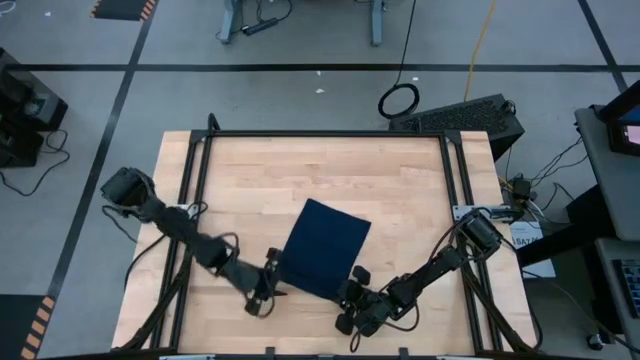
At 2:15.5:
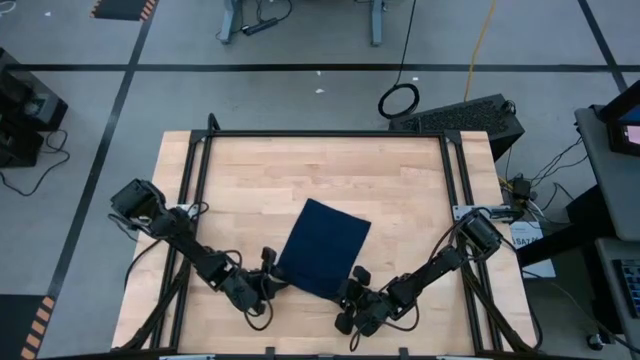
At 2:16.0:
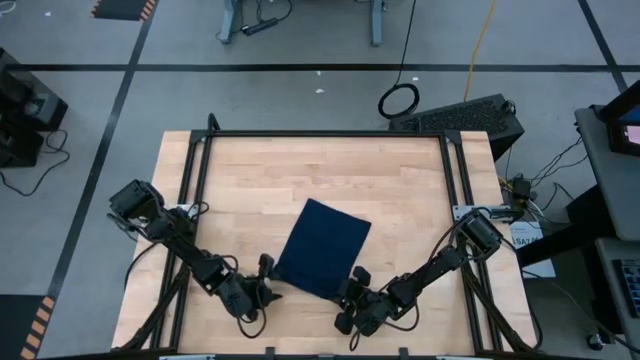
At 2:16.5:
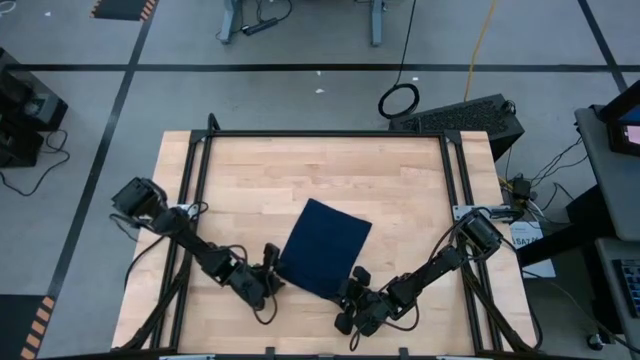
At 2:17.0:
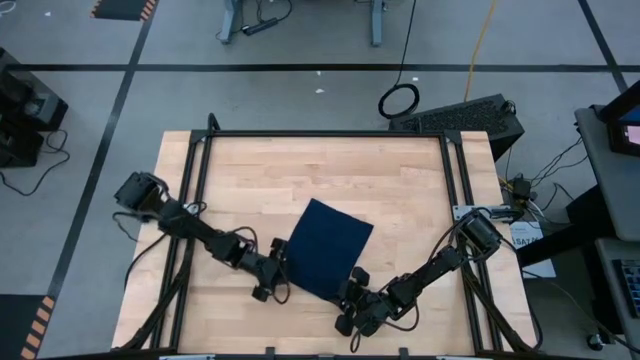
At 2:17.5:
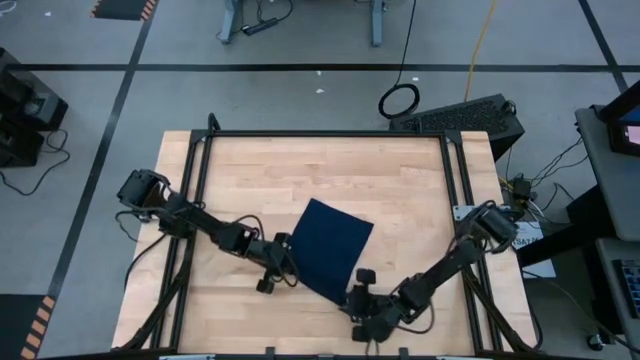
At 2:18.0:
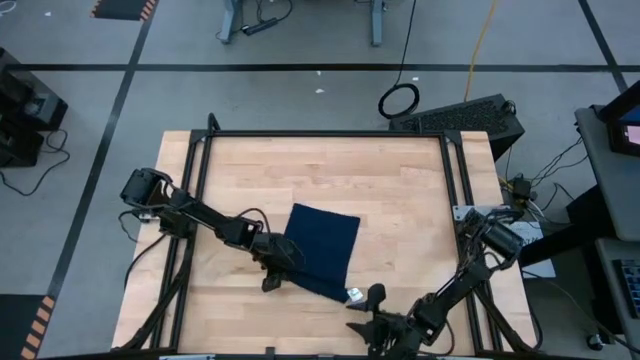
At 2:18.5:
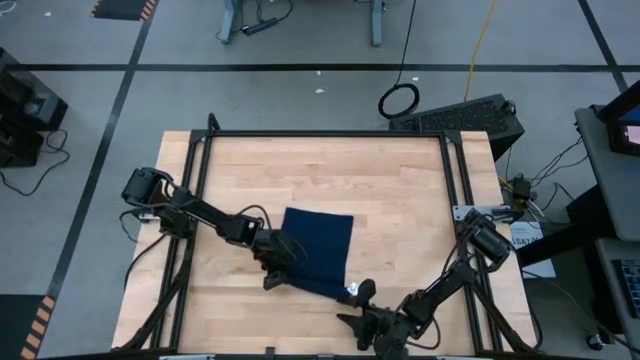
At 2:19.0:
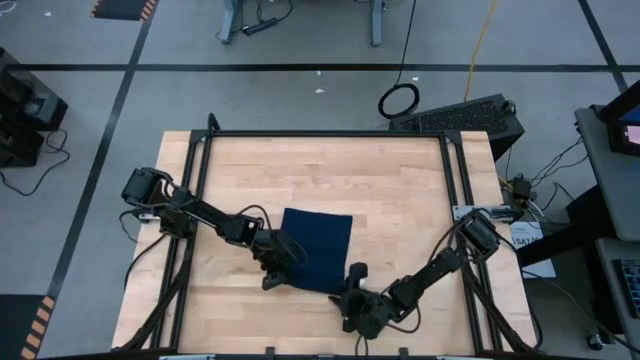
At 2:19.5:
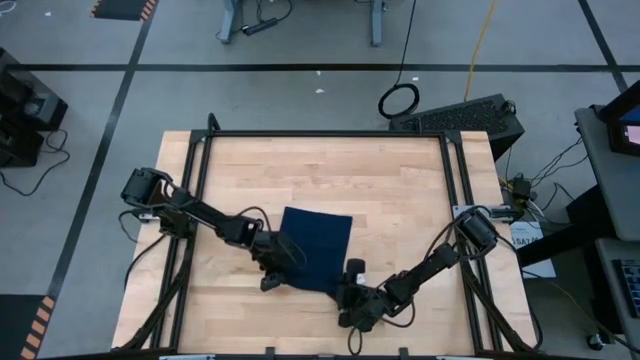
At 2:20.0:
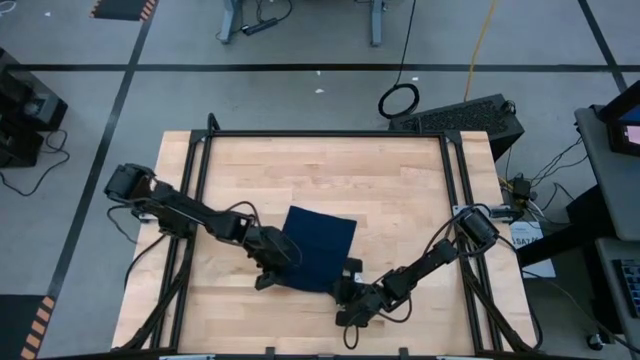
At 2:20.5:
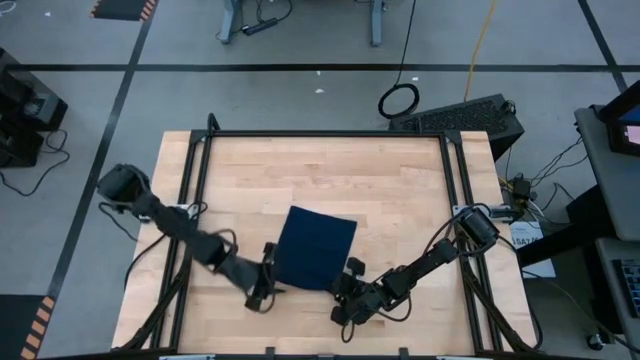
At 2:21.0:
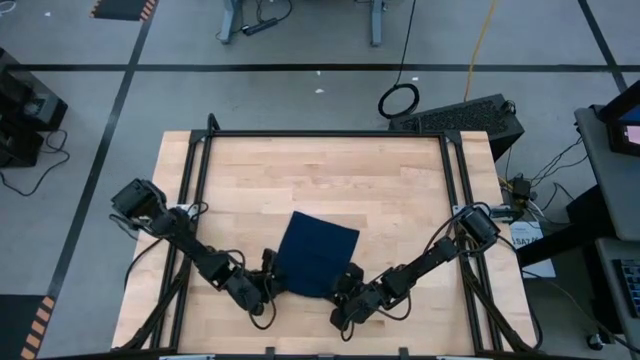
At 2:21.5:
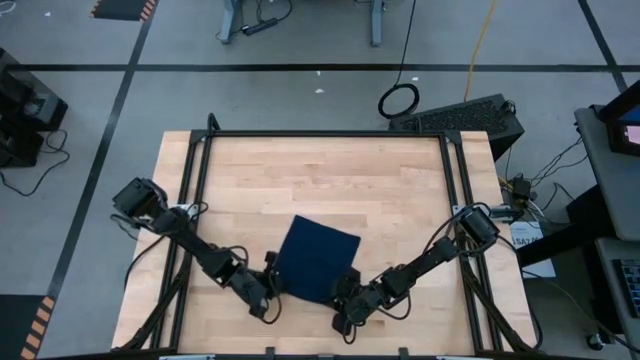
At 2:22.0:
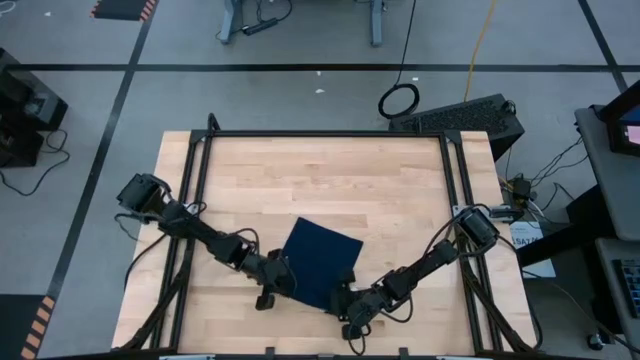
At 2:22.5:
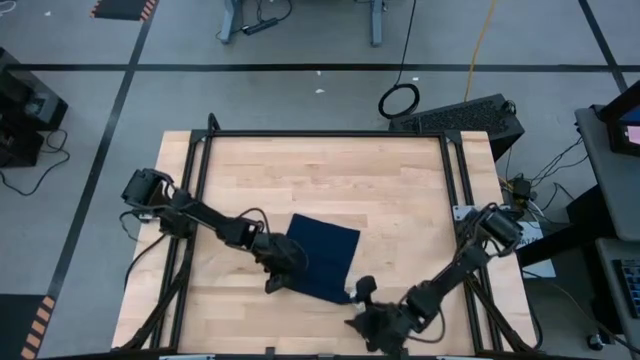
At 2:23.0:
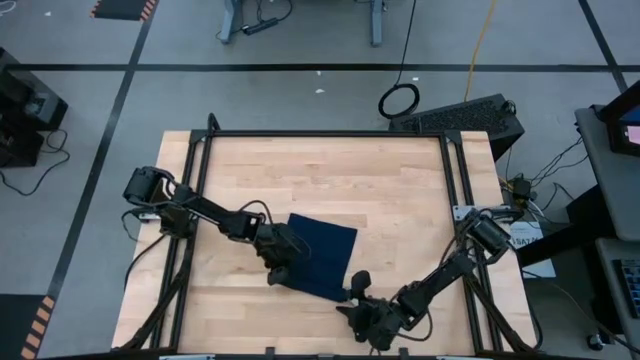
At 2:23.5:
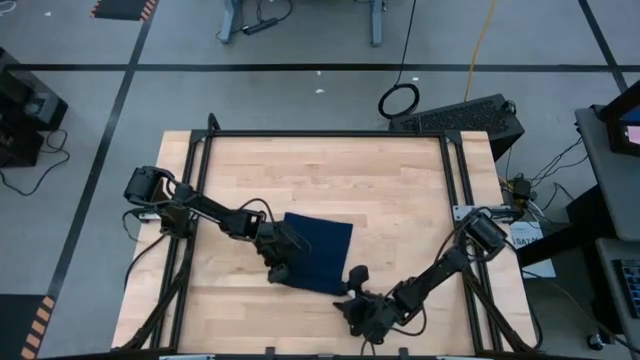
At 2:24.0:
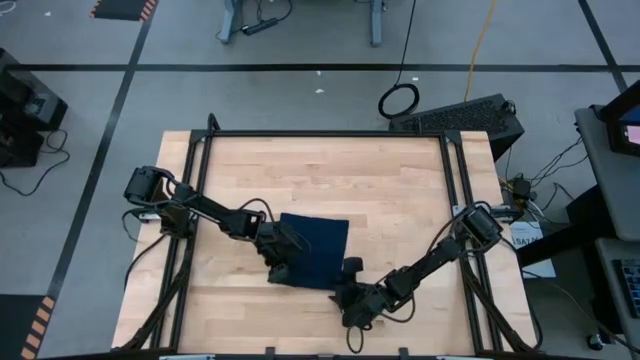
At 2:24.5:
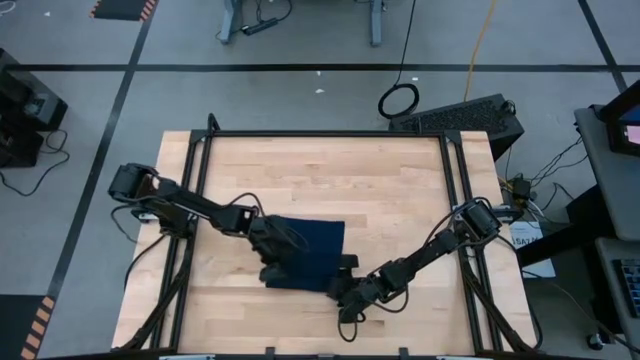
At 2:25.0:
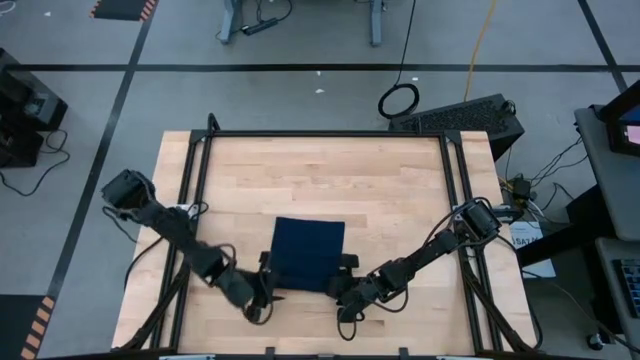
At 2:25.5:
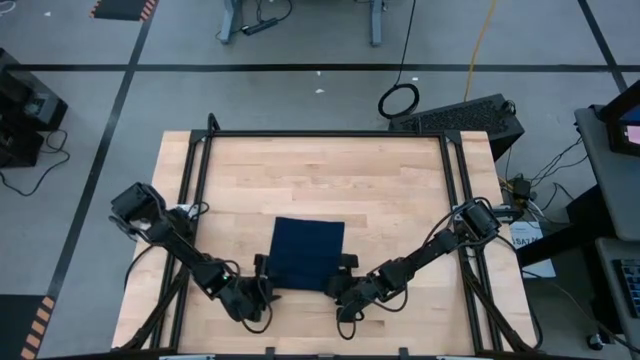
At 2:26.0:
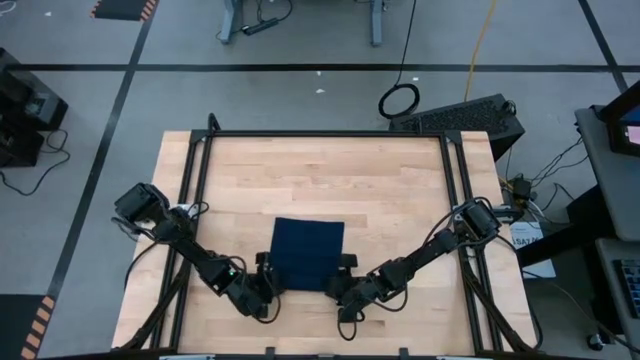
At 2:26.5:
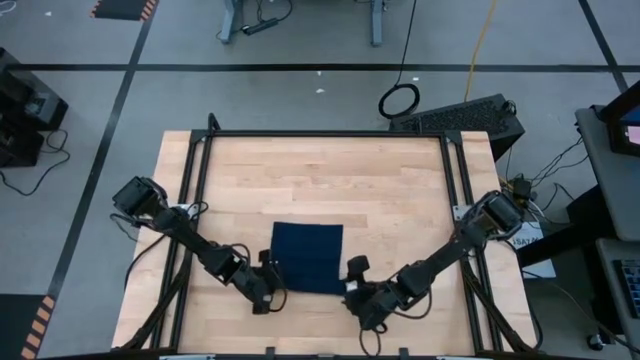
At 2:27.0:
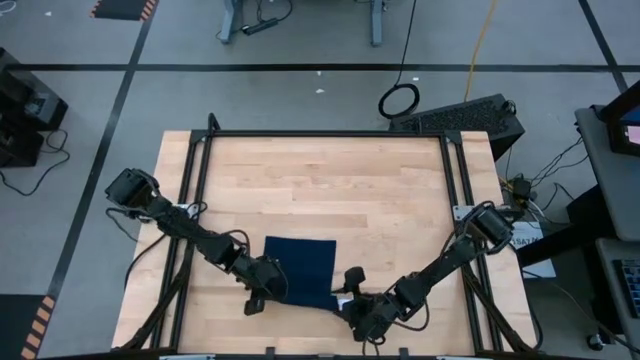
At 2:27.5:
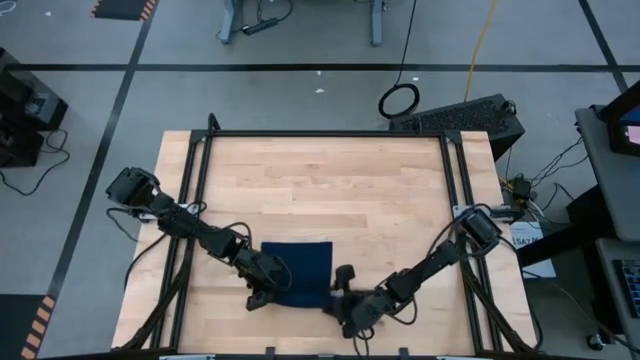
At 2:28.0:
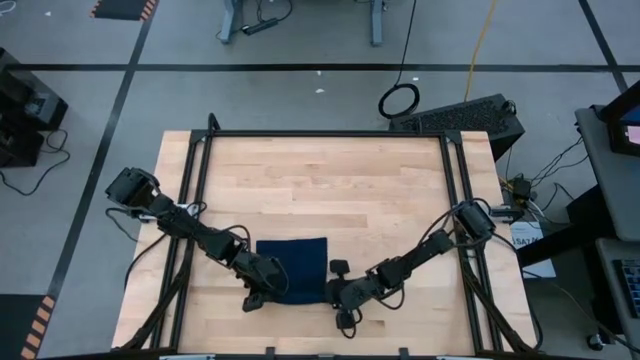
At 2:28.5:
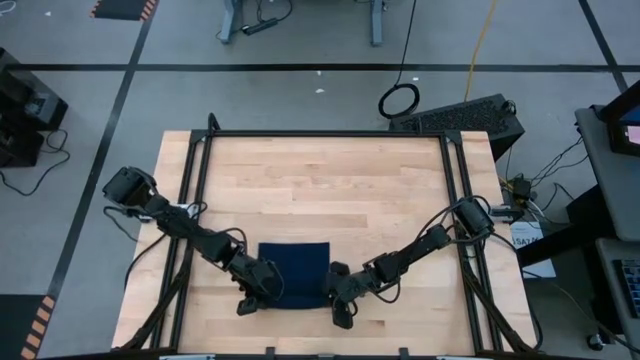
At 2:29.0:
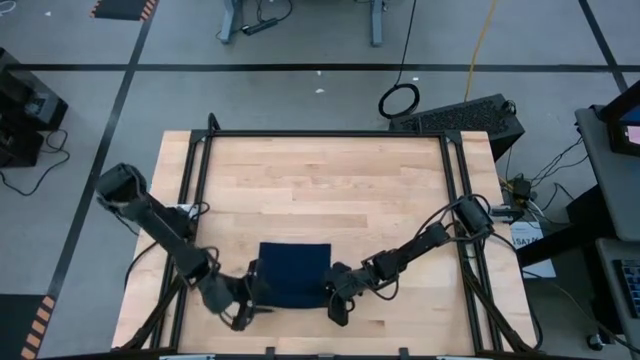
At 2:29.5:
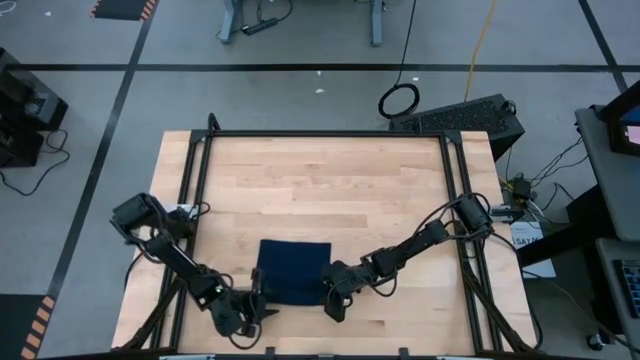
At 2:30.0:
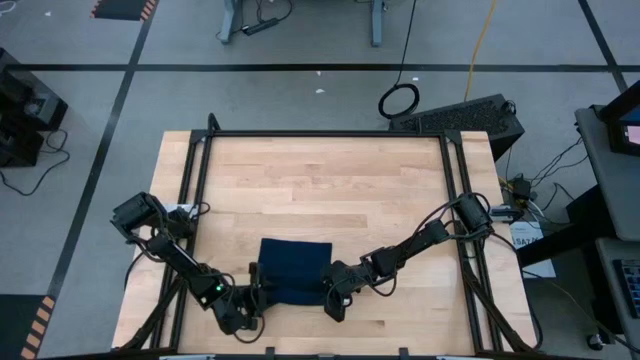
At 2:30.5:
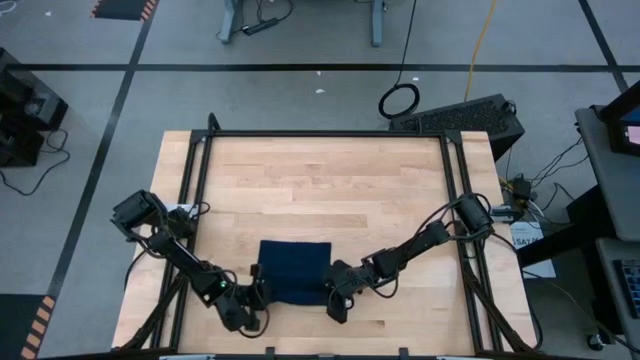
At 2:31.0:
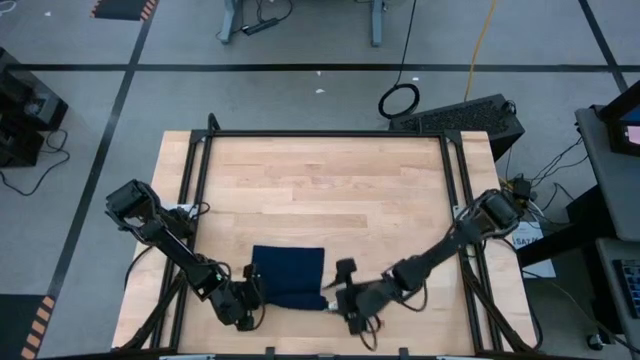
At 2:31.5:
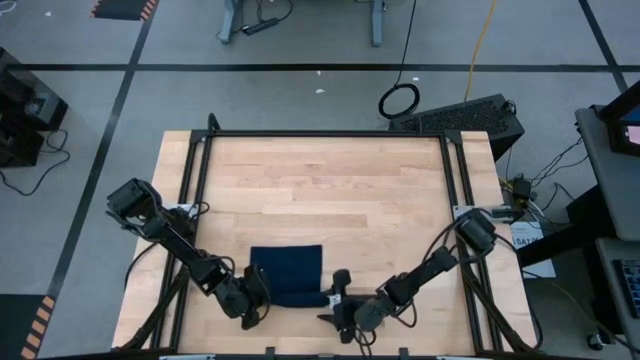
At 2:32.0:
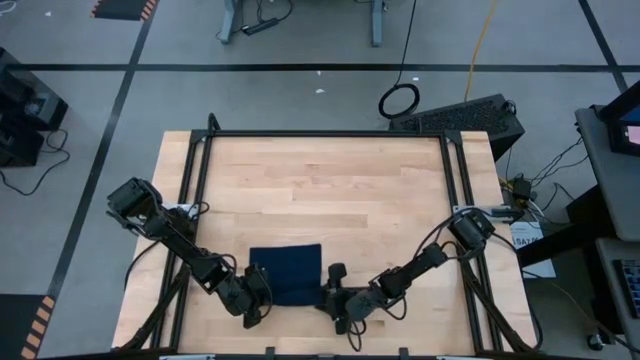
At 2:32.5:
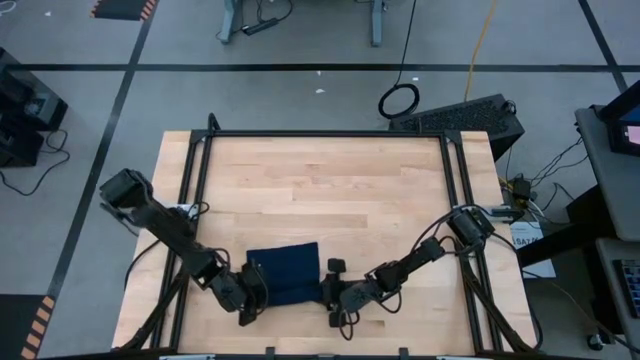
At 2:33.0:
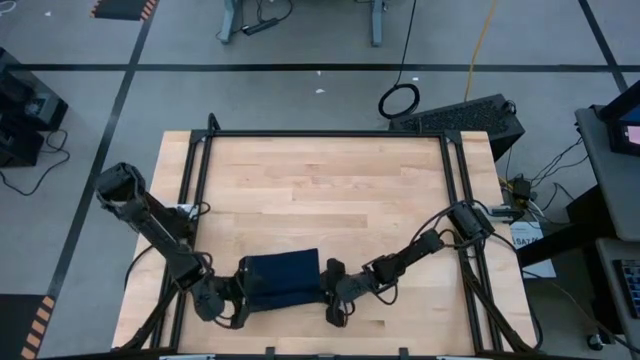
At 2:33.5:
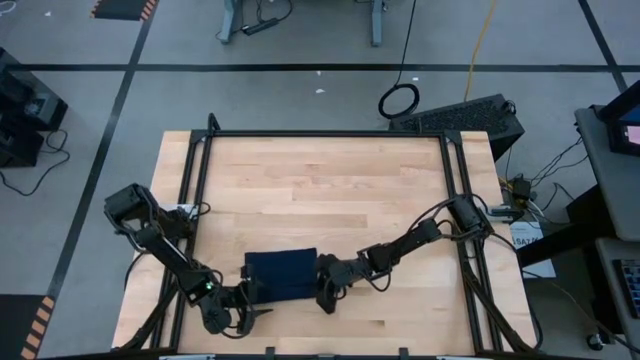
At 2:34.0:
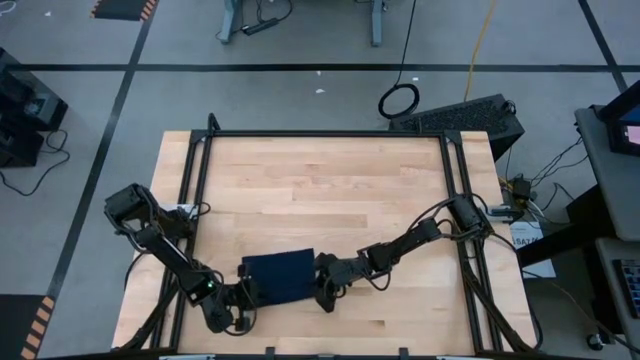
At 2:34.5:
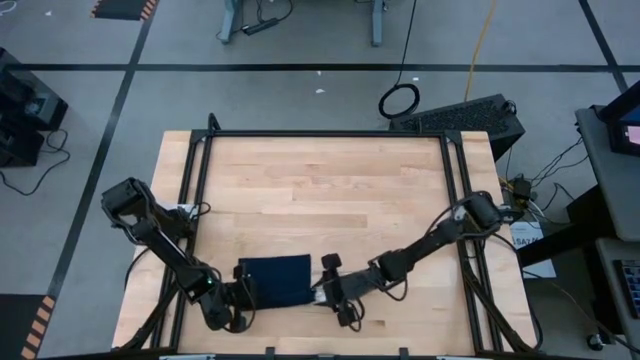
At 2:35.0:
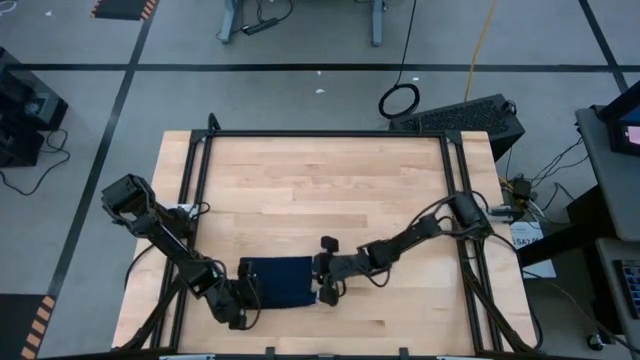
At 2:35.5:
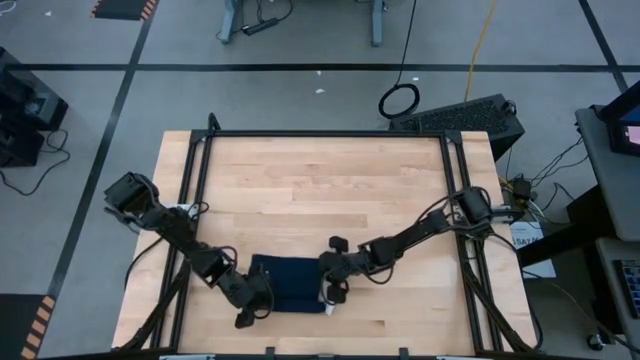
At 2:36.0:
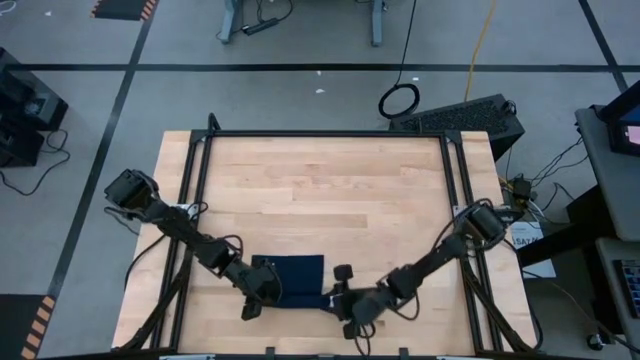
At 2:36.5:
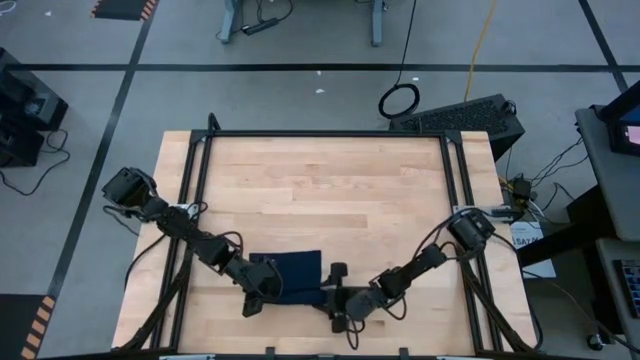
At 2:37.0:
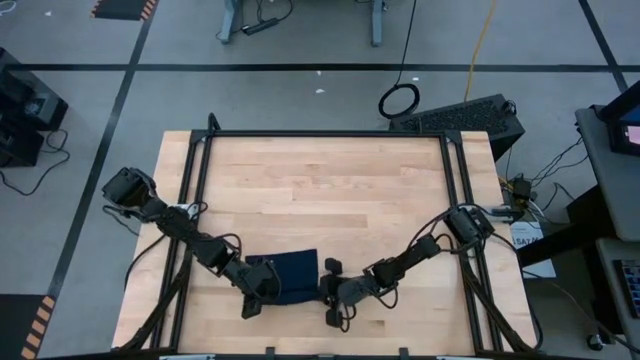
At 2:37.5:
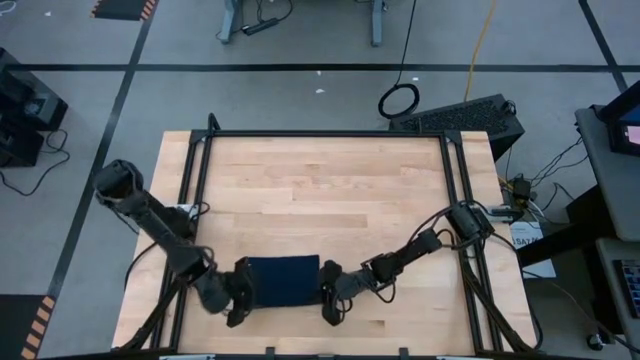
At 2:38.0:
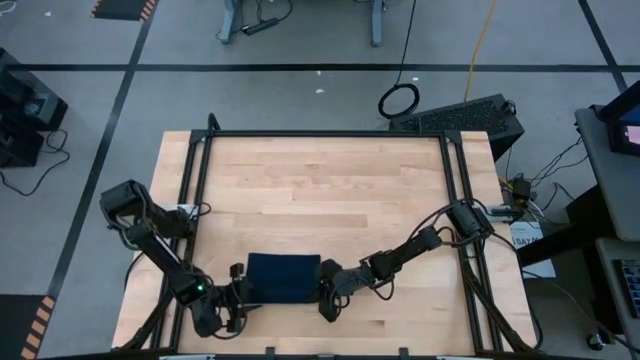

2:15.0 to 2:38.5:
Task: Roll towel
Roll the dark blue towel
